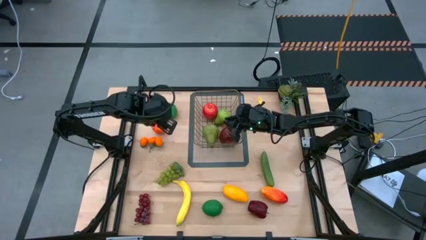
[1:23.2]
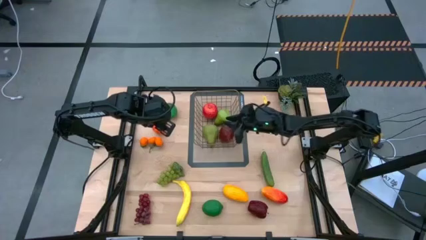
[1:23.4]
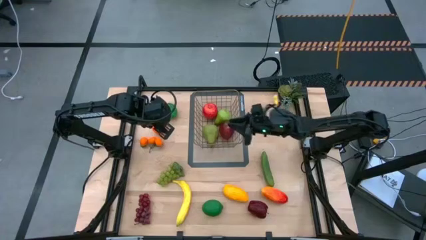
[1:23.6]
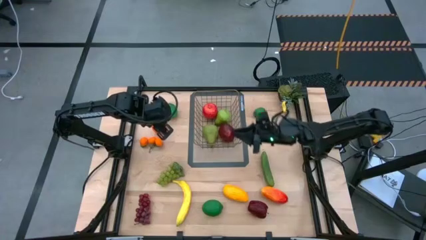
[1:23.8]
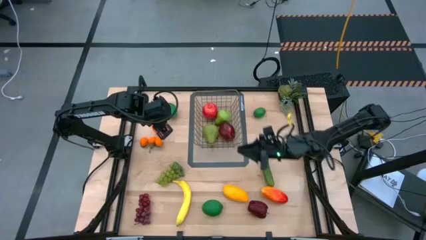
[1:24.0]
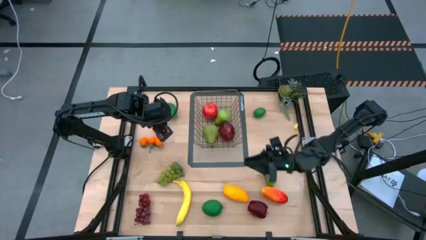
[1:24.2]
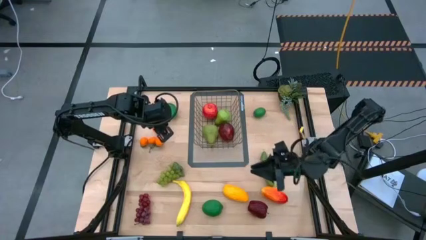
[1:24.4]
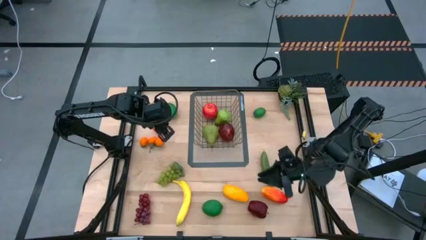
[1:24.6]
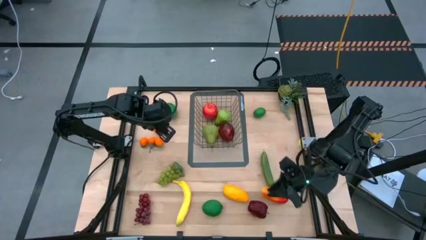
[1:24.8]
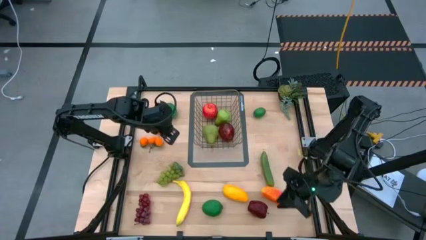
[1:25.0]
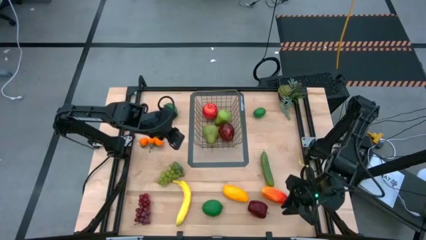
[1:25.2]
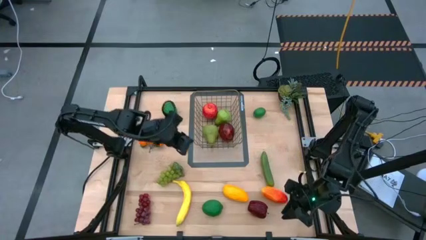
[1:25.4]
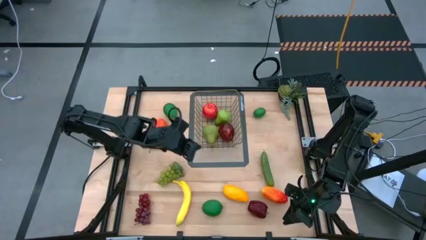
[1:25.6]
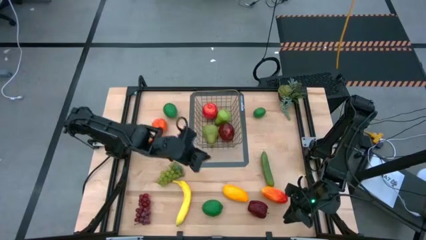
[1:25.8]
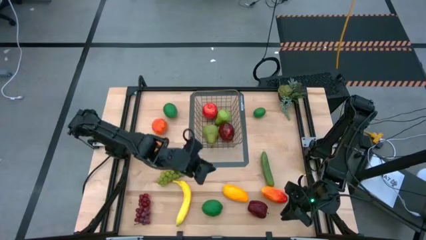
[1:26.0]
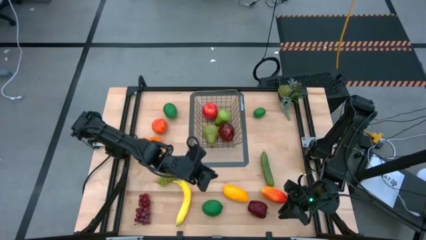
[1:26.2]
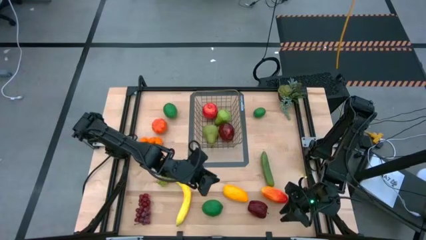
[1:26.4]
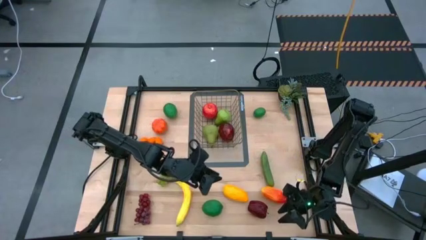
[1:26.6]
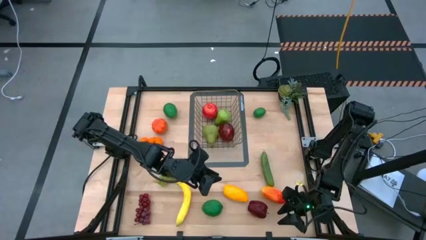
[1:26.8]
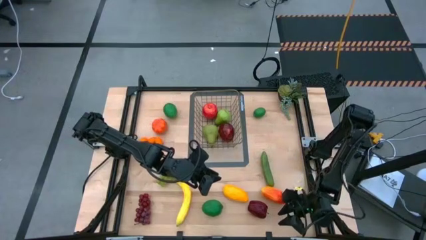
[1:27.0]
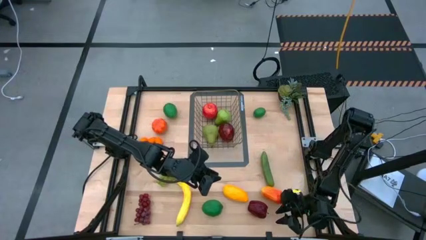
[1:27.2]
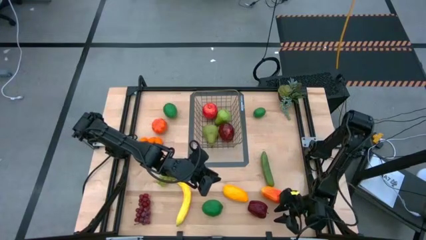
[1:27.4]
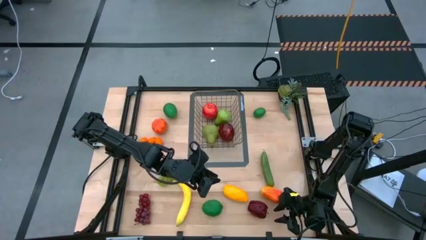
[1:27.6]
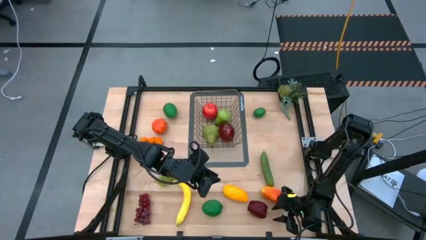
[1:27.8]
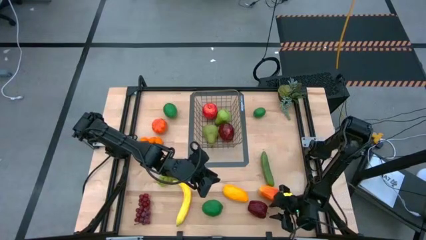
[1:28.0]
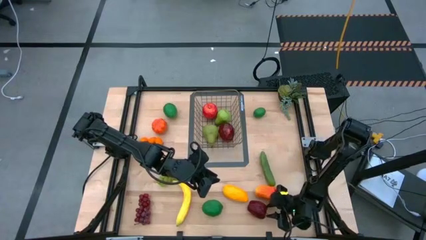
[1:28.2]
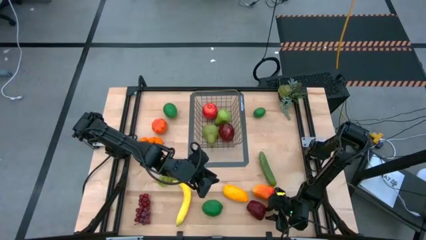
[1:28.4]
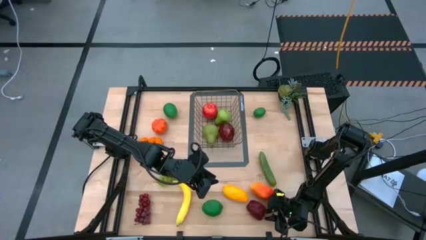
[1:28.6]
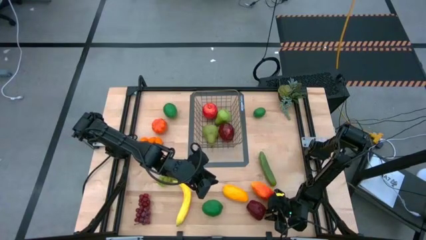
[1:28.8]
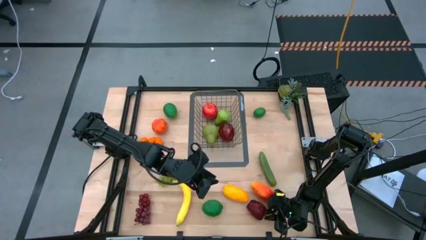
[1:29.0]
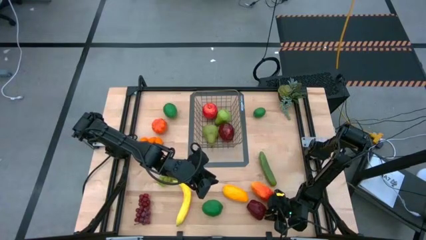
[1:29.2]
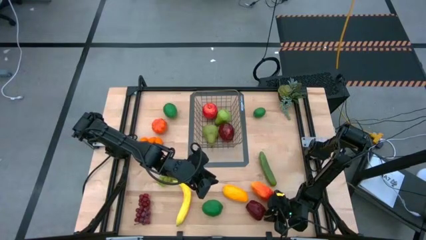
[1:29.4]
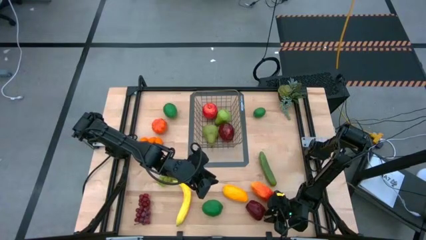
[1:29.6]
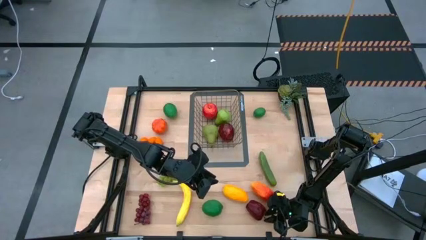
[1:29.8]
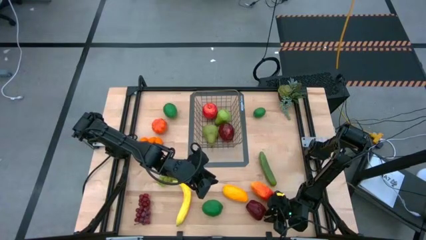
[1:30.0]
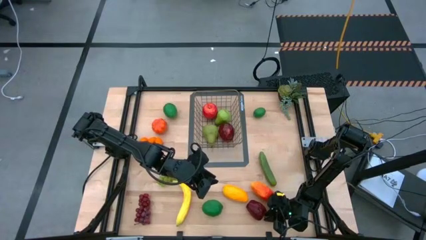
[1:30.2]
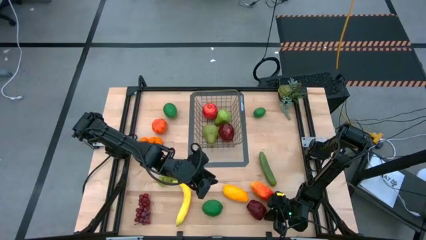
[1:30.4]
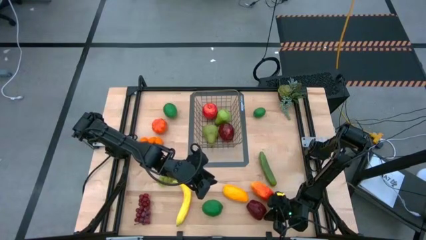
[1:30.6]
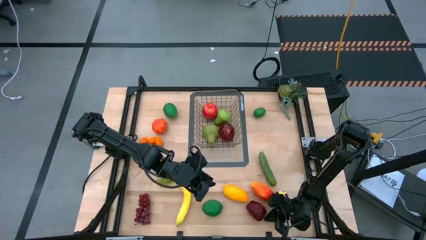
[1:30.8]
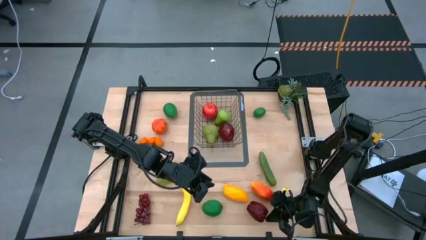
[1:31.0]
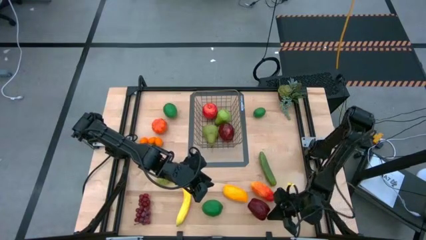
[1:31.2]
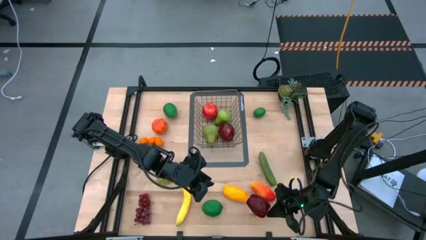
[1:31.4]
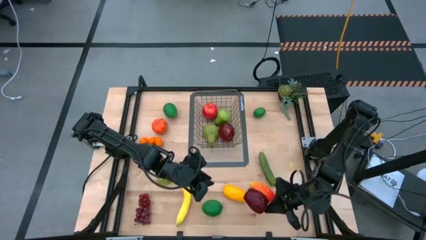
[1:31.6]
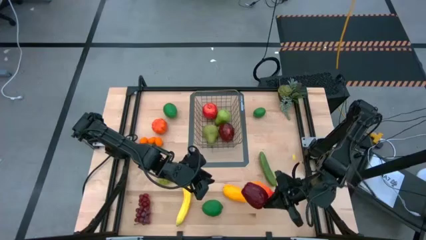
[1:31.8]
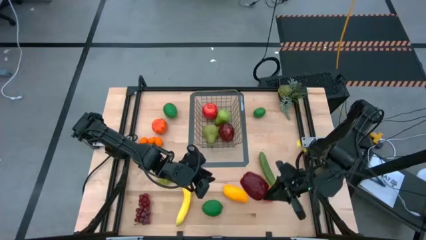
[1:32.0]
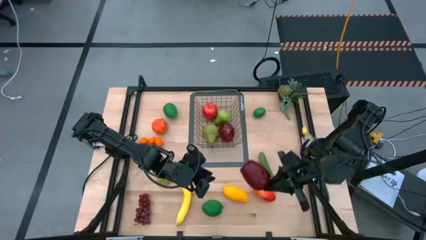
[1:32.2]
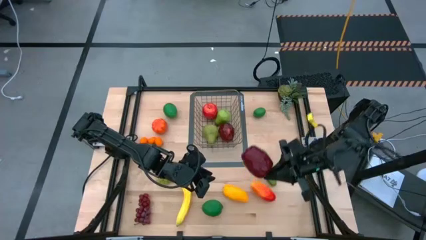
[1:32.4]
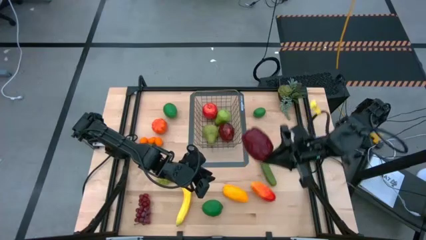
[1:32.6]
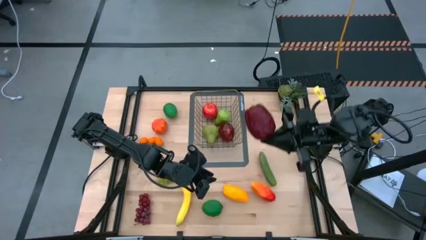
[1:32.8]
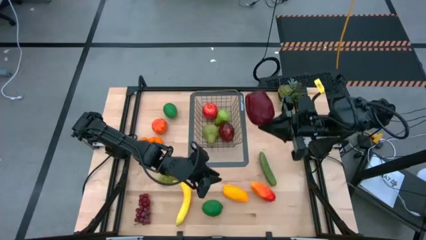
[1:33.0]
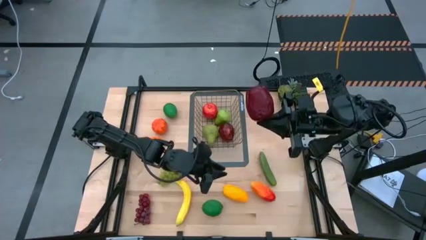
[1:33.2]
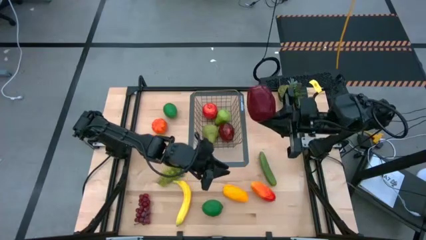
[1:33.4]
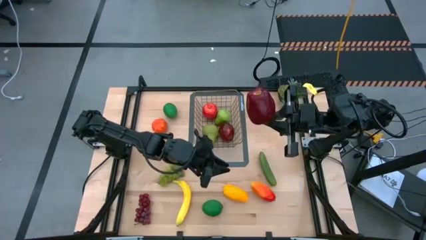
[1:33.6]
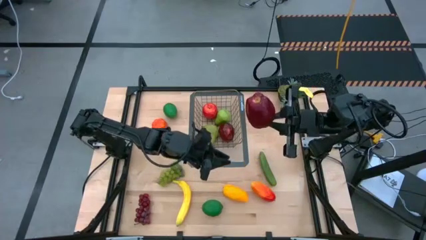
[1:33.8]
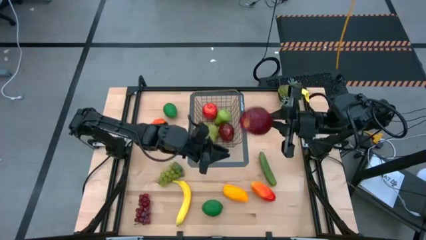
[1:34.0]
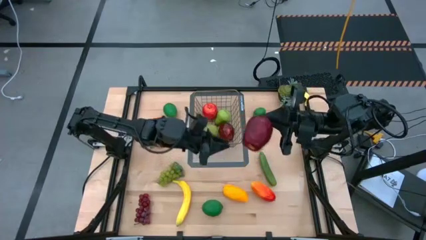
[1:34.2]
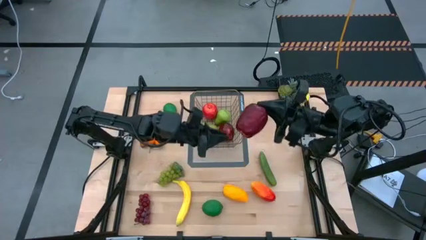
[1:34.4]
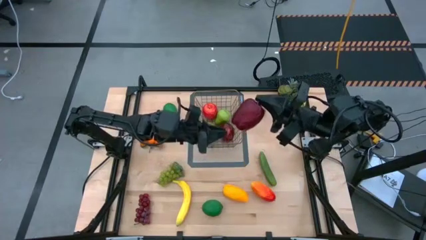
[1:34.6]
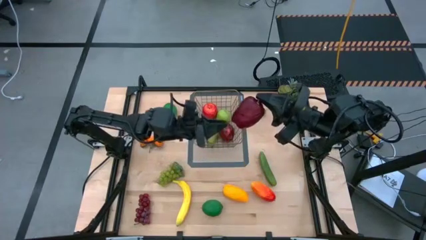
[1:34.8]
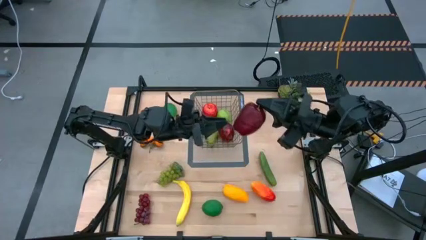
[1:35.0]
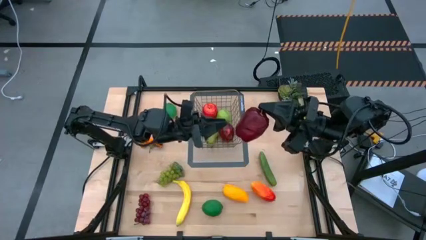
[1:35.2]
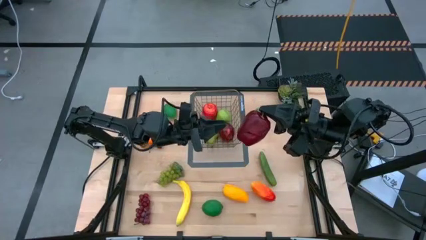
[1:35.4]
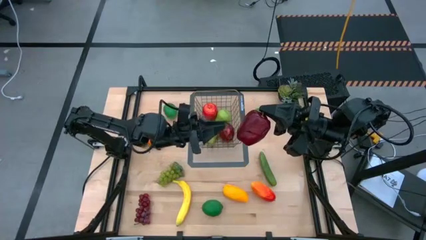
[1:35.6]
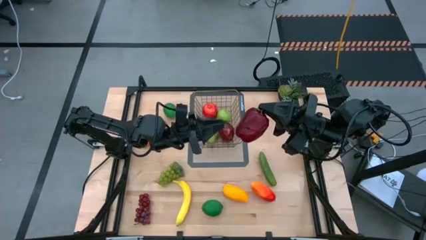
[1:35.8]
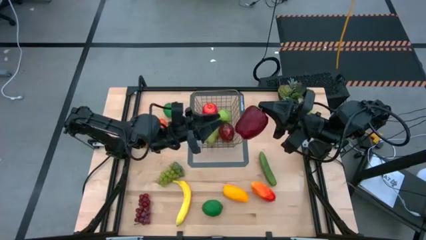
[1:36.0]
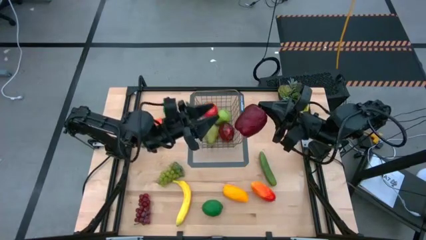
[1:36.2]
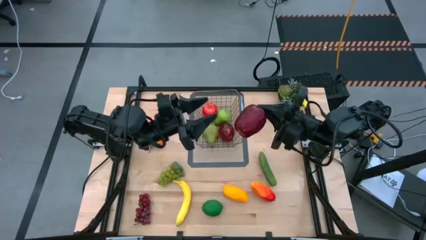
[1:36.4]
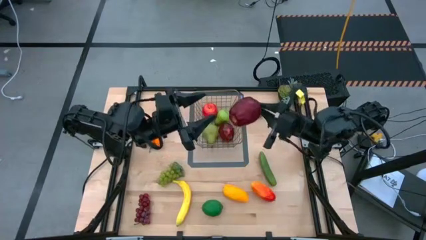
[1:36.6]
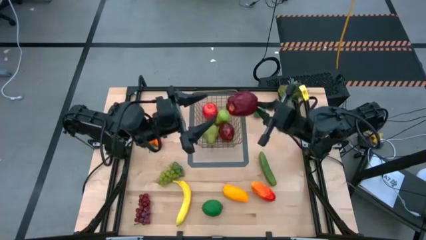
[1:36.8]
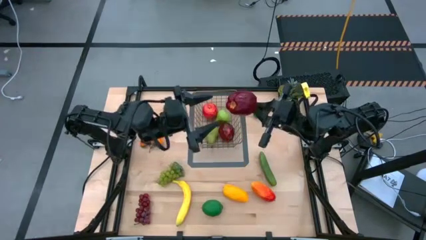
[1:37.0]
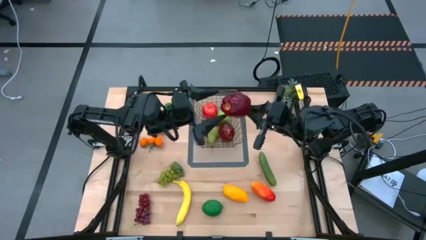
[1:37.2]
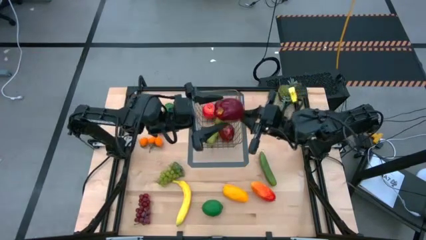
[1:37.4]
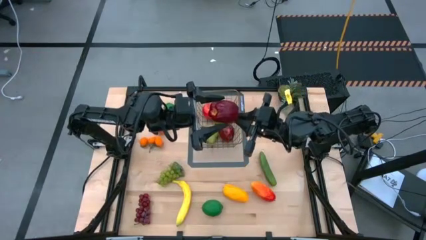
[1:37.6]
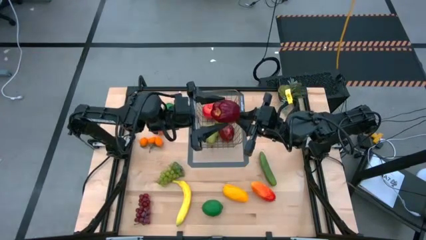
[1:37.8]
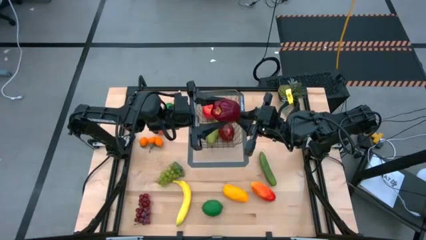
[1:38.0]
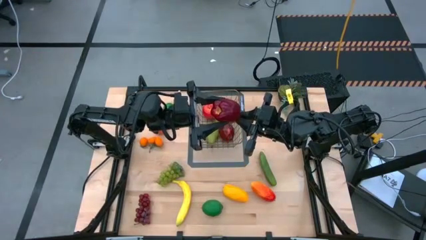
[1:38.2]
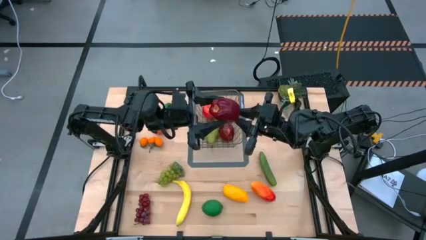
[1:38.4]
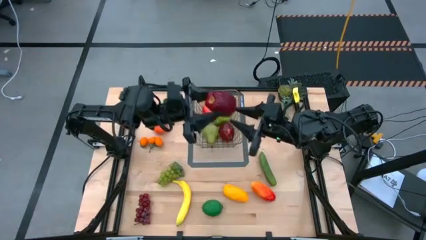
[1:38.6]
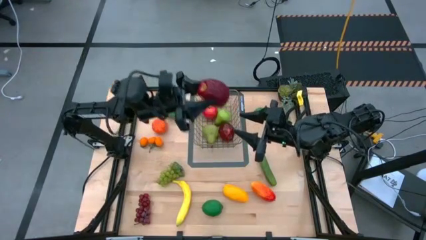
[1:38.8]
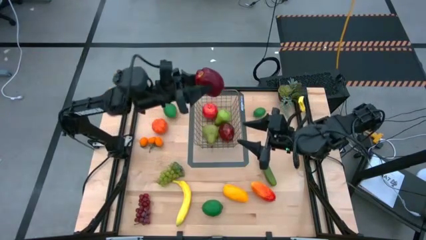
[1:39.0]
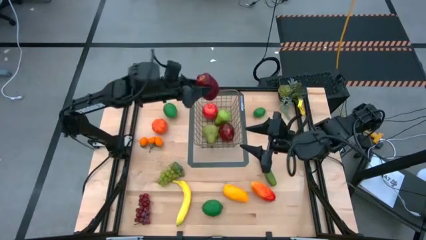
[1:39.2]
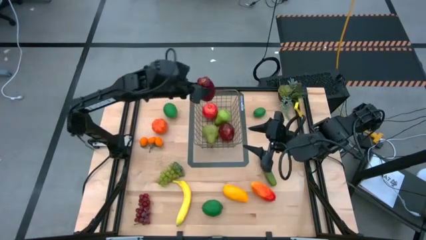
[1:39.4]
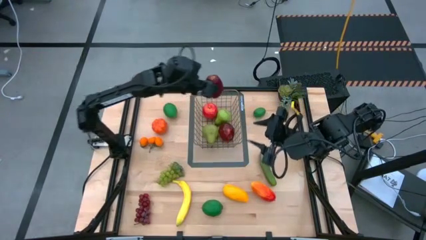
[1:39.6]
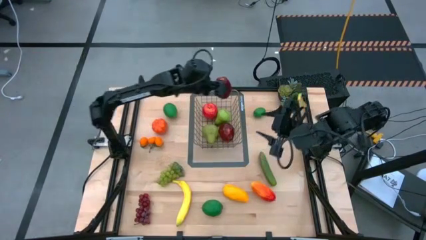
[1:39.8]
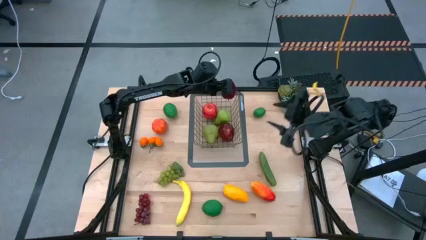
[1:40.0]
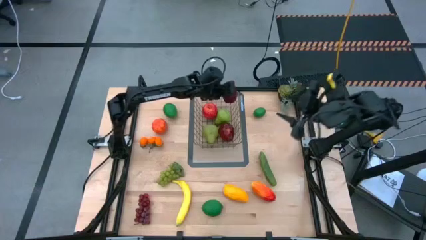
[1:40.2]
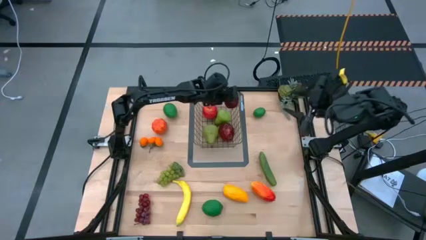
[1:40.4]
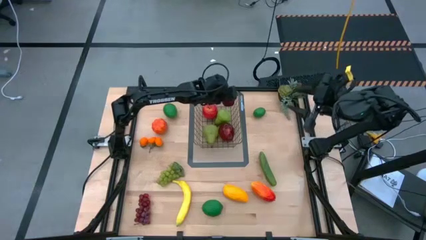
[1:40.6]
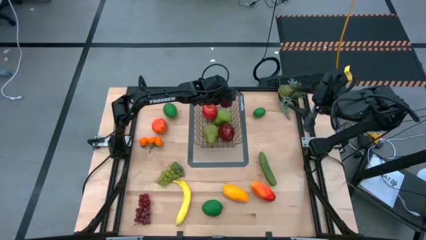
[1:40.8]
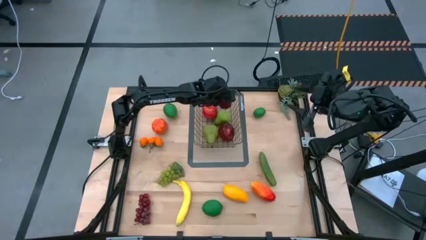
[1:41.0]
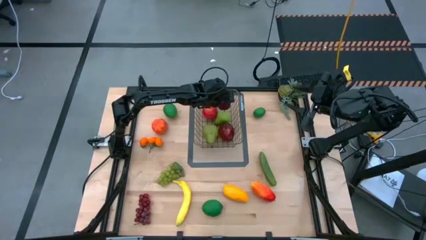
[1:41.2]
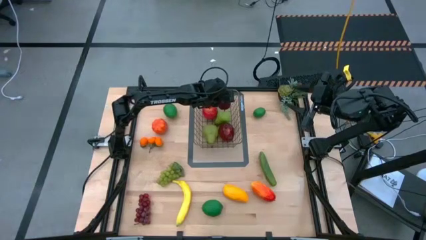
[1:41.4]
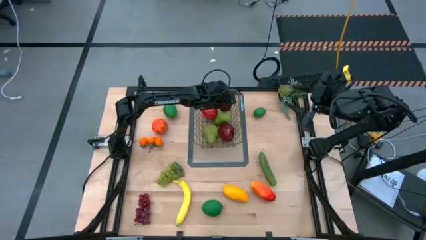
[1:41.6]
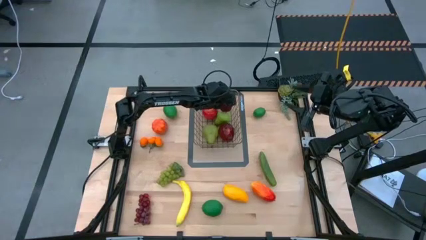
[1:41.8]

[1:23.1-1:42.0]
Task: Build produce basket
Put the dark red apple into the gold wire basket
